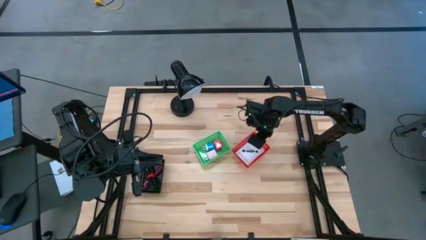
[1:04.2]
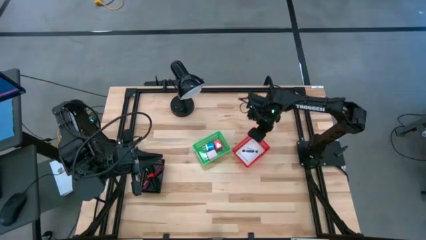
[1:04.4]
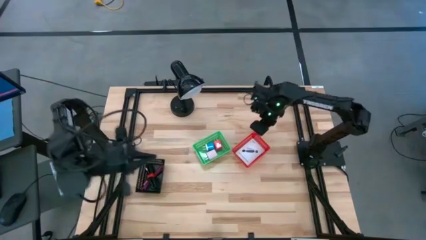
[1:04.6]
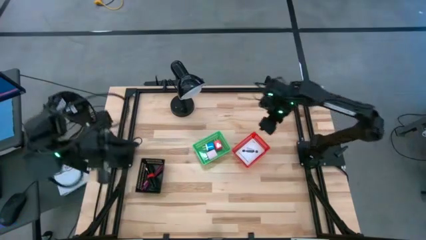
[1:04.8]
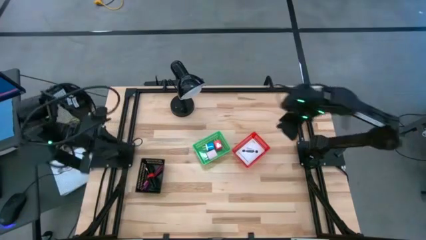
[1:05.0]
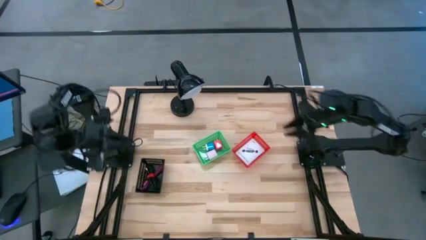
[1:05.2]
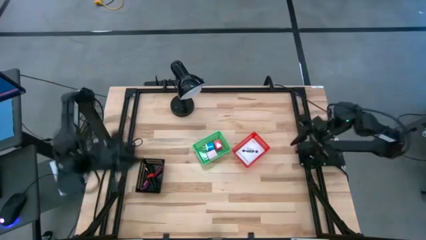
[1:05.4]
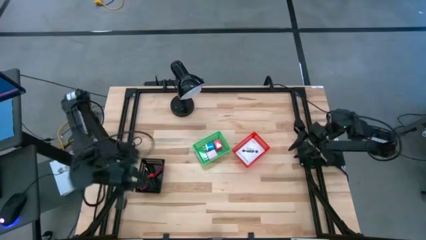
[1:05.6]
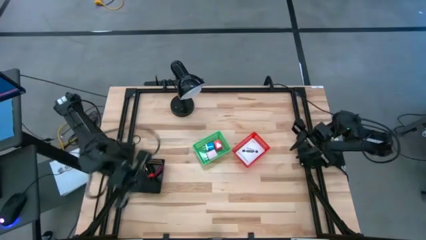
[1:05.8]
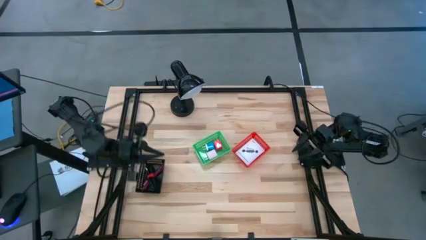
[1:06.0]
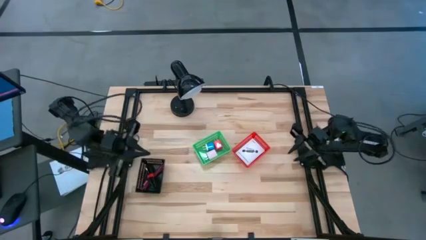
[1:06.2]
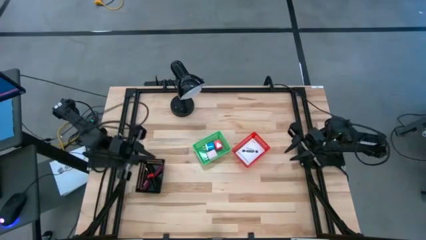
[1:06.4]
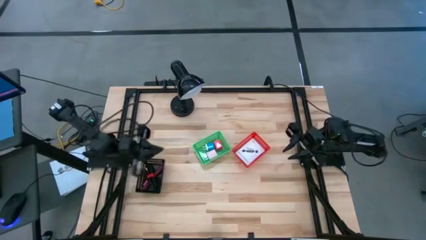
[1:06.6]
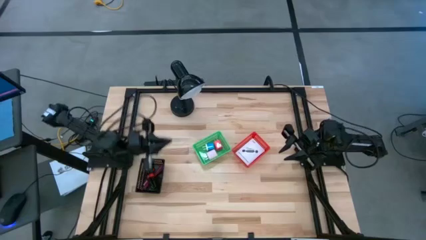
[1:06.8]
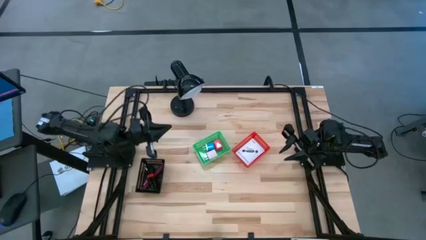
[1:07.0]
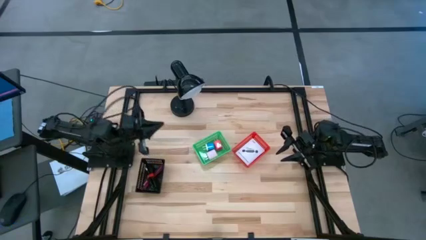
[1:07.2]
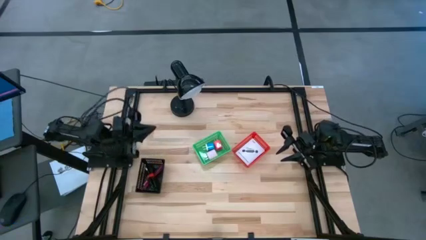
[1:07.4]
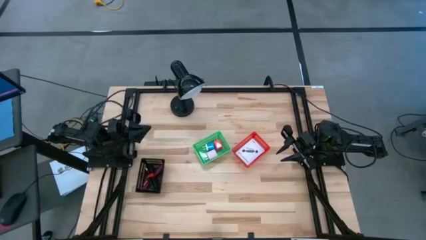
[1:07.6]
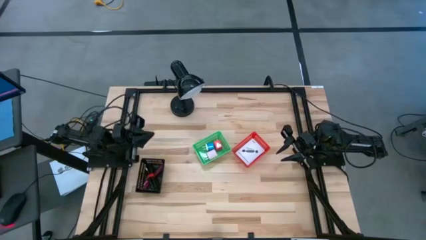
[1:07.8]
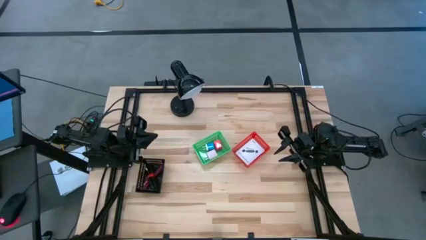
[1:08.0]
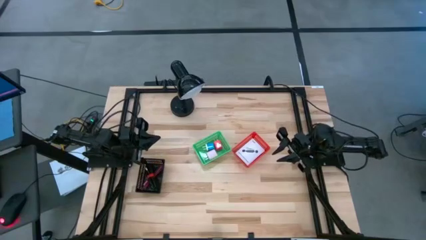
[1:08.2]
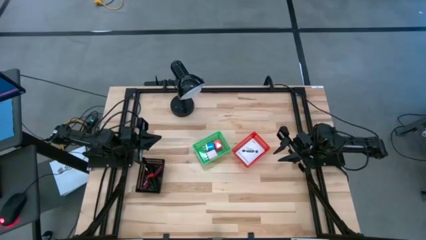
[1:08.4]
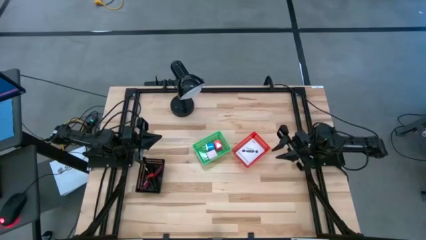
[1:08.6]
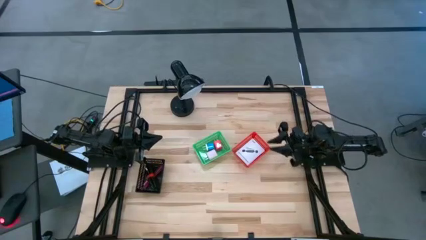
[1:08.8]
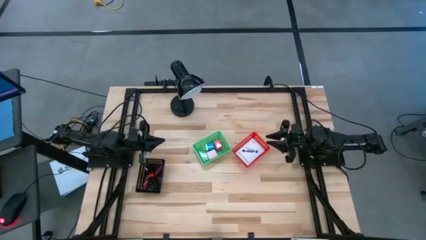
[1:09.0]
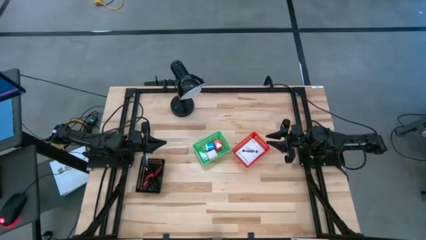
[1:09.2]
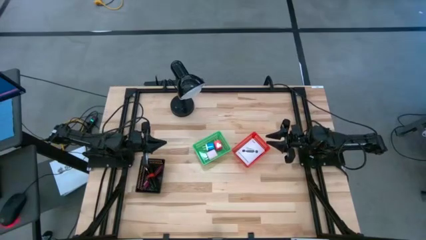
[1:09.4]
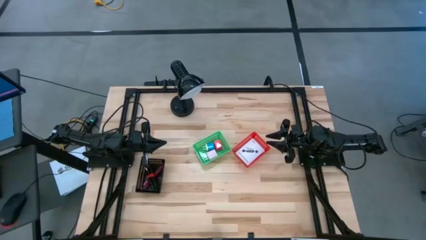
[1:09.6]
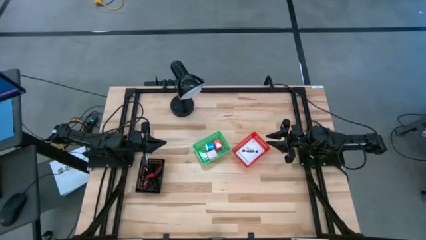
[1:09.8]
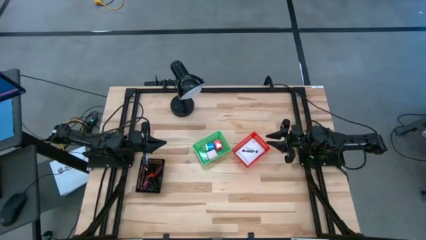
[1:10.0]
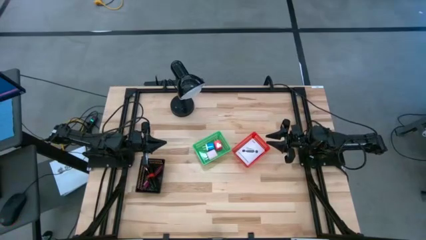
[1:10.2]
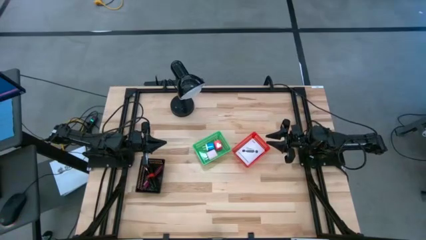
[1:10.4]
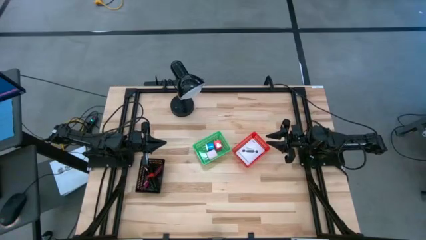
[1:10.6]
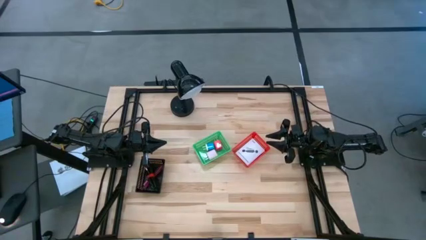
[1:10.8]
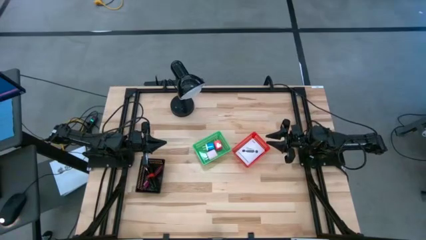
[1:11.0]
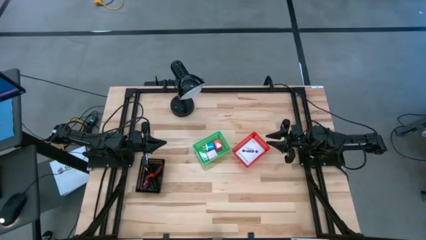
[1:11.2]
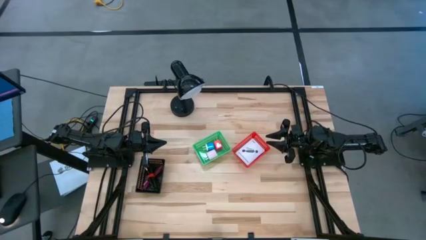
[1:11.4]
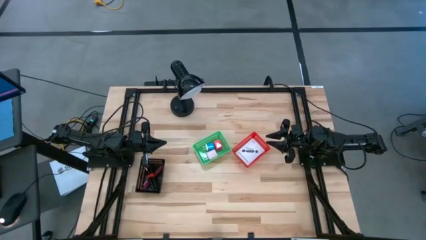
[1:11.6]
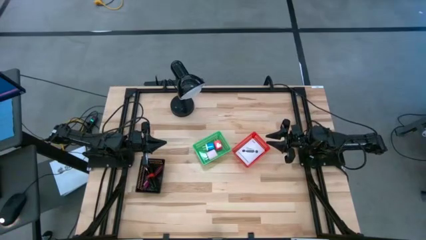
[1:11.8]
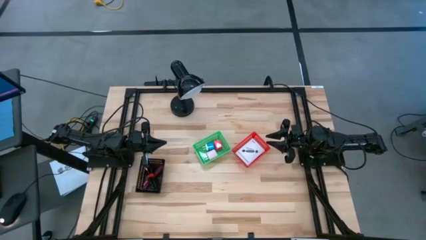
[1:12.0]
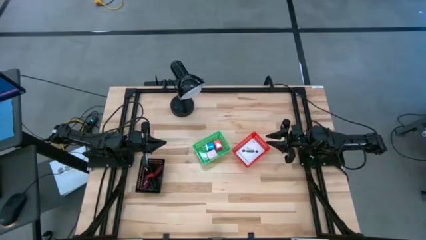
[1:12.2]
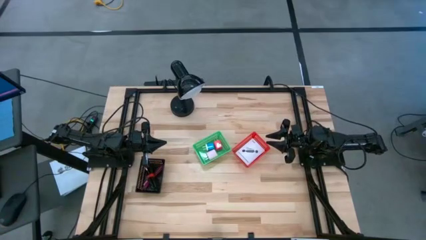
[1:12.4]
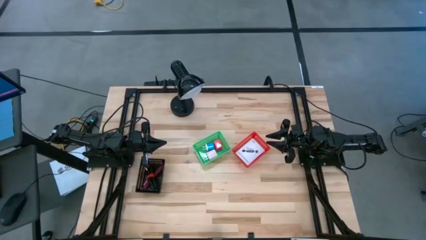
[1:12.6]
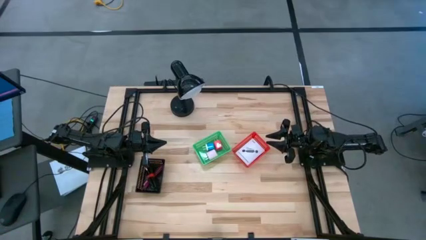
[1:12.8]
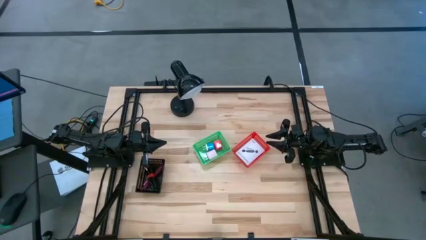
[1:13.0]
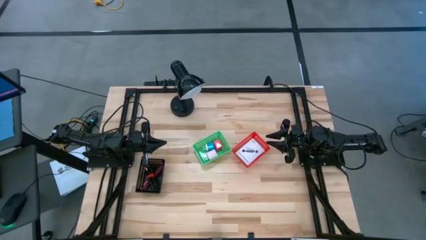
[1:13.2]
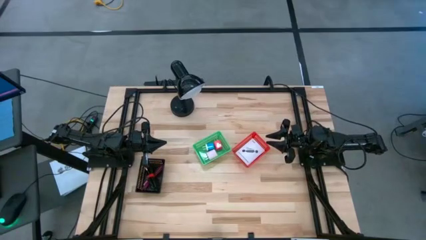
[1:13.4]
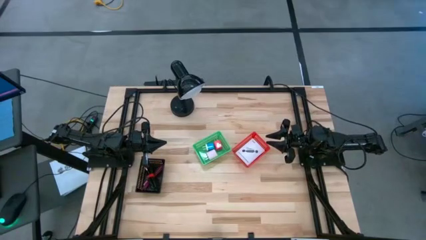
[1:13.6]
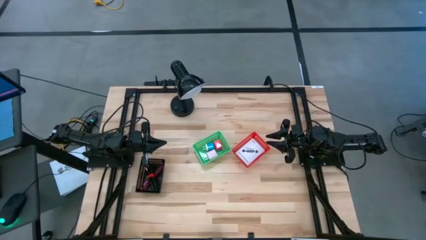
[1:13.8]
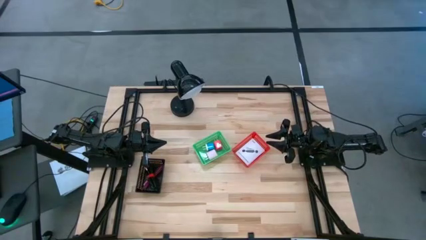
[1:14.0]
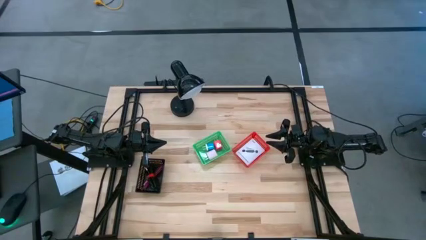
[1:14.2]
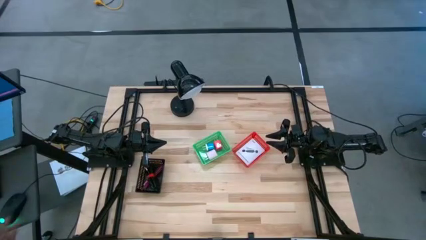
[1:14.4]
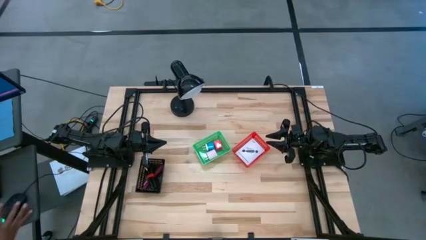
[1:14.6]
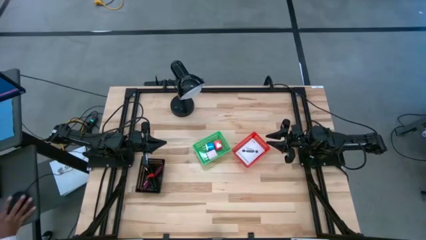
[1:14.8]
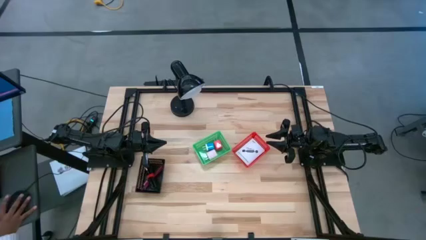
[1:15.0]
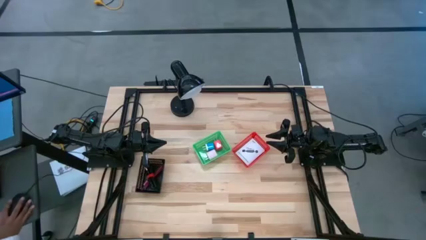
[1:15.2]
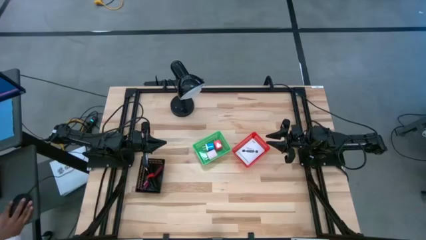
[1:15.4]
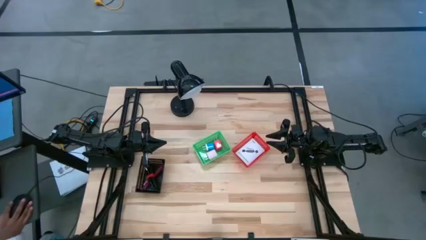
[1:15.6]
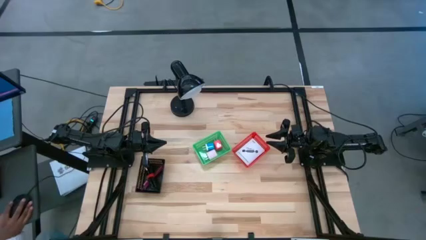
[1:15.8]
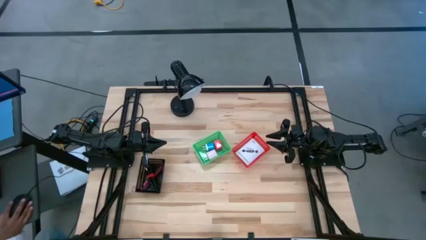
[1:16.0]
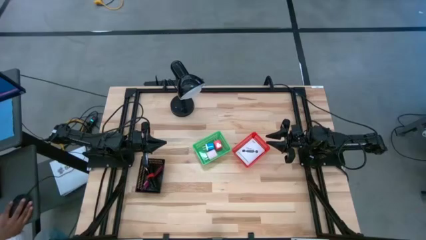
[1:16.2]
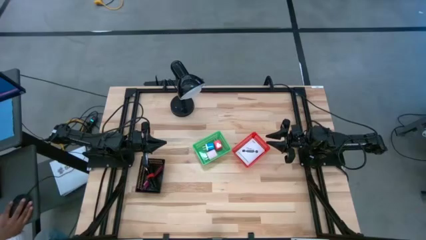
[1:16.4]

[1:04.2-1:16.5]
Task: Pick and place items into bin
Return to Home Position

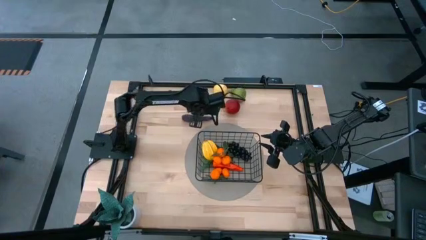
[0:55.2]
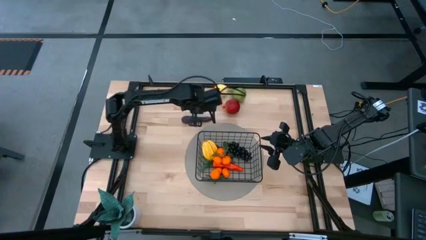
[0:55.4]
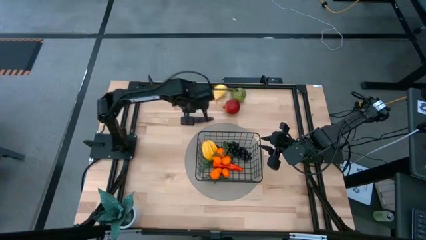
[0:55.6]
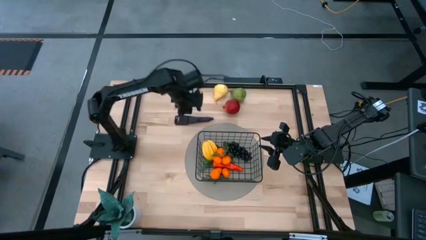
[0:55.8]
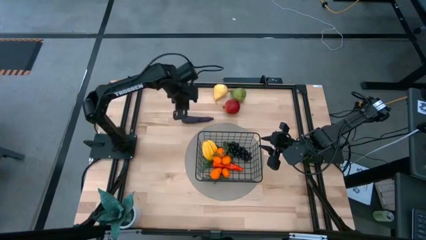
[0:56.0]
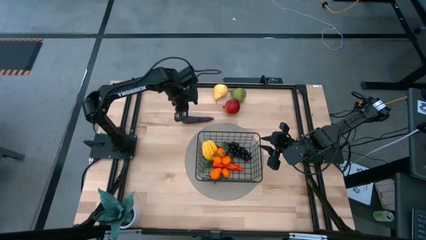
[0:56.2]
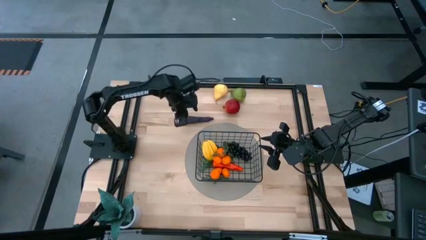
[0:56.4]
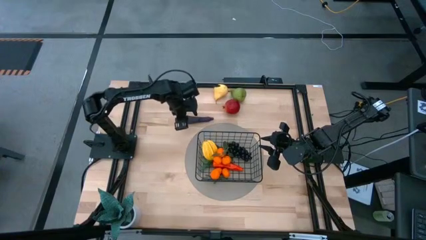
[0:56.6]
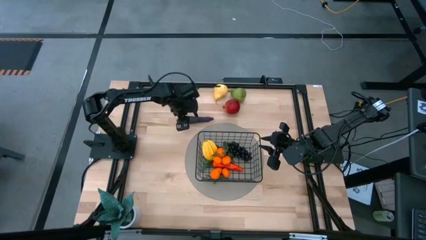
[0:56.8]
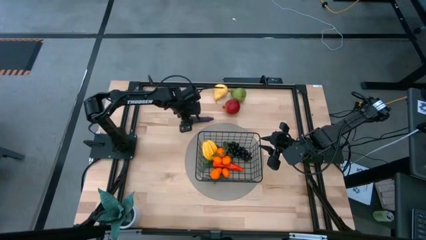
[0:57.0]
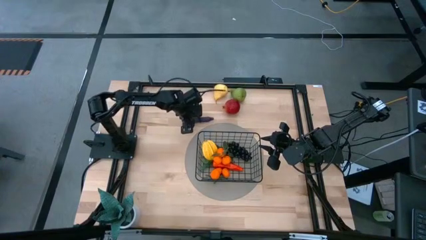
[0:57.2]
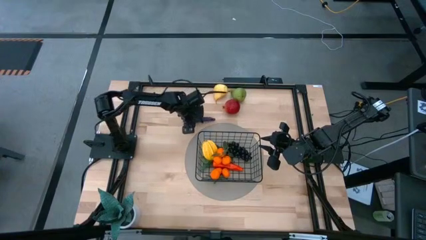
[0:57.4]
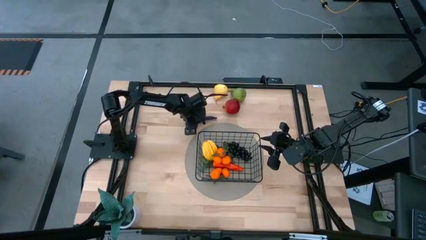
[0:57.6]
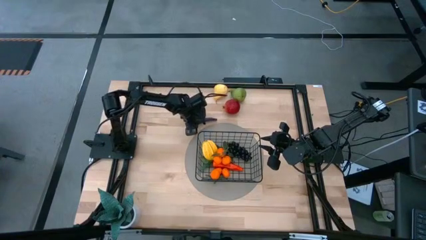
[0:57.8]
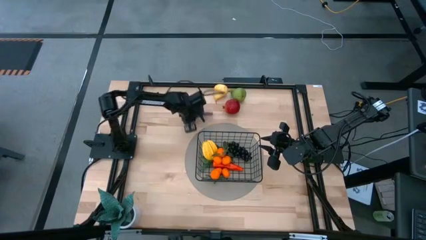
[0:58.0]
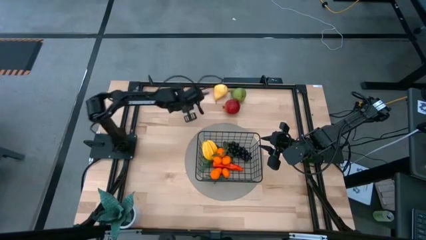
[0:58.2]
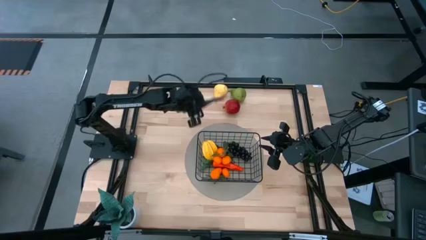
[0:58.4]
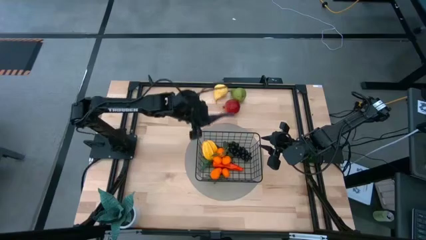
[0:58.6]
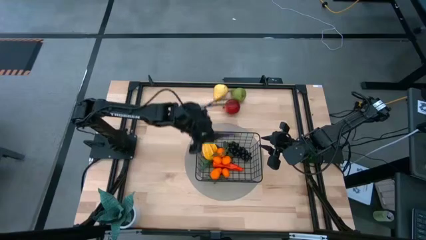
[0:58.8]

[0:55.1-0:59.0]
Task: Build produce basket
Put the eggplant into the wire basket
